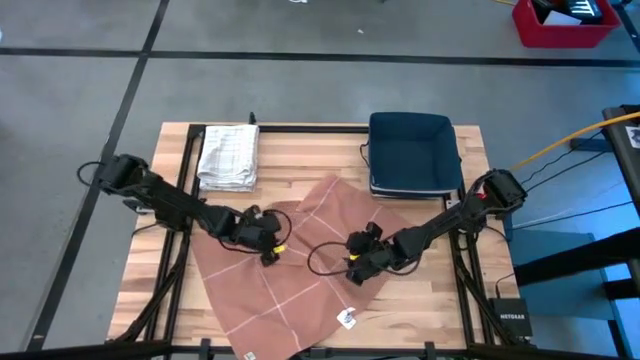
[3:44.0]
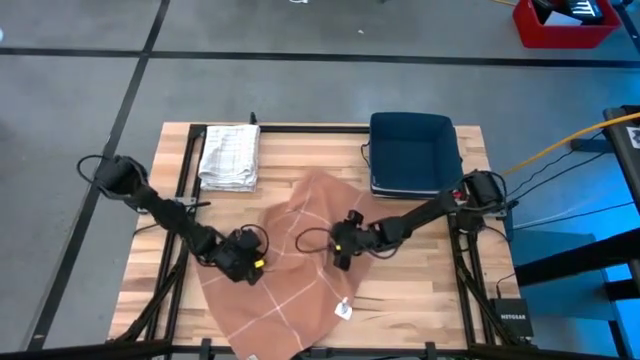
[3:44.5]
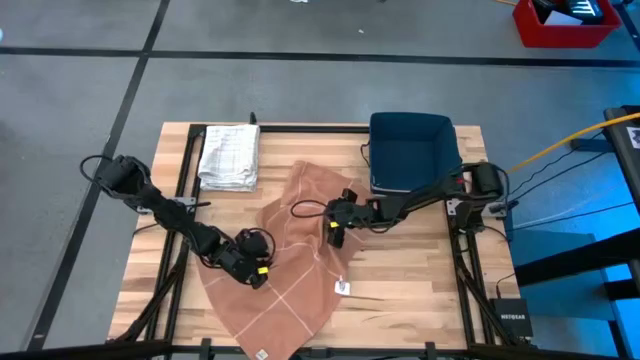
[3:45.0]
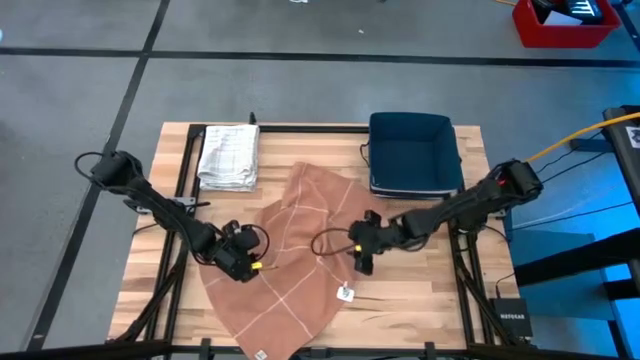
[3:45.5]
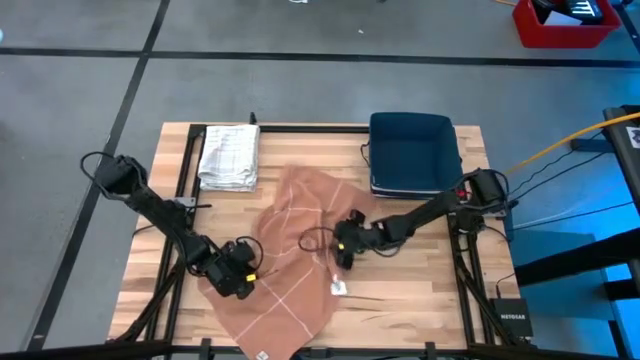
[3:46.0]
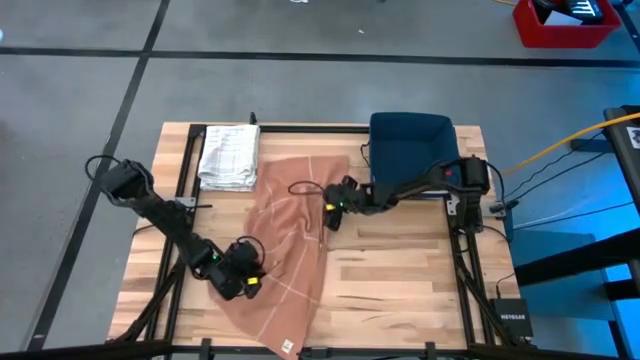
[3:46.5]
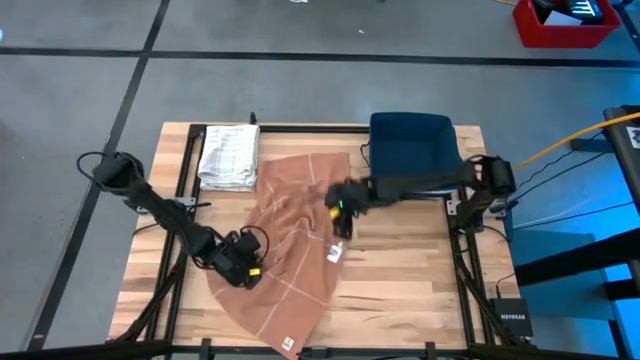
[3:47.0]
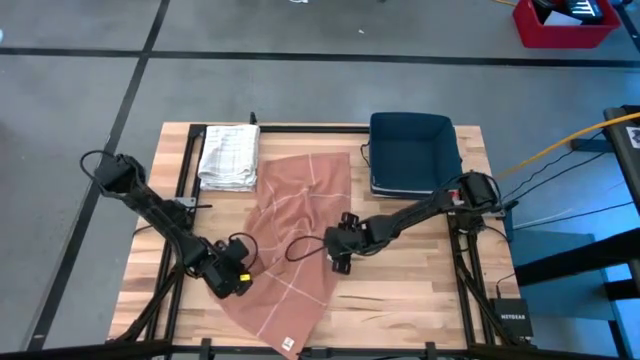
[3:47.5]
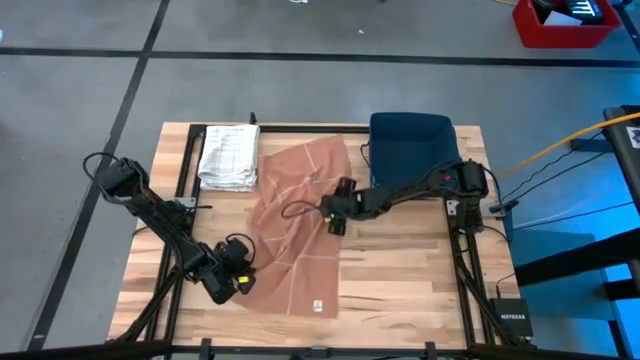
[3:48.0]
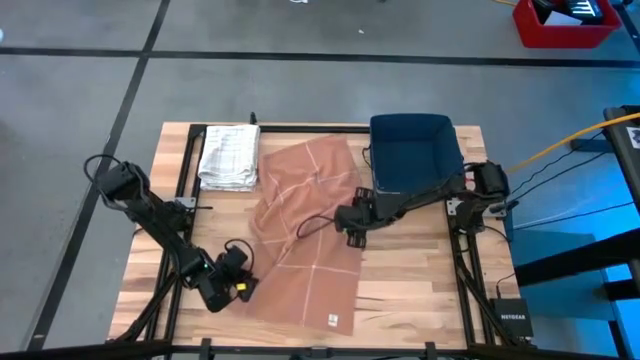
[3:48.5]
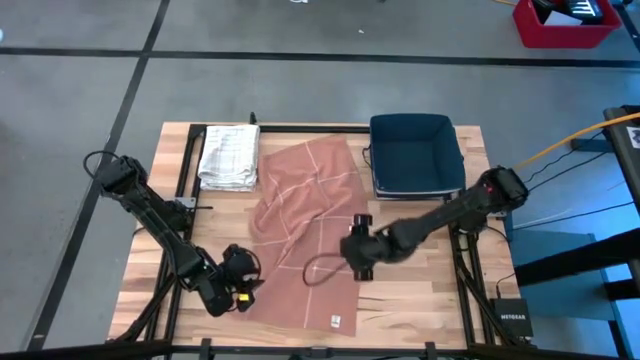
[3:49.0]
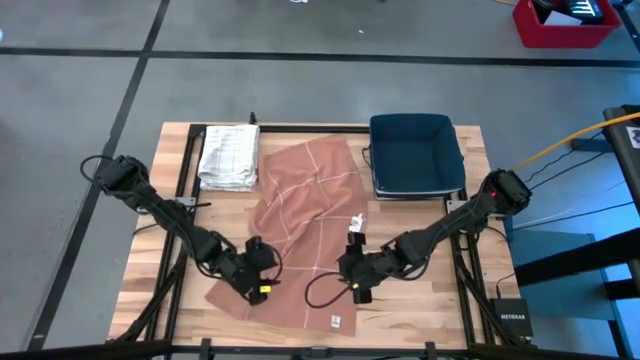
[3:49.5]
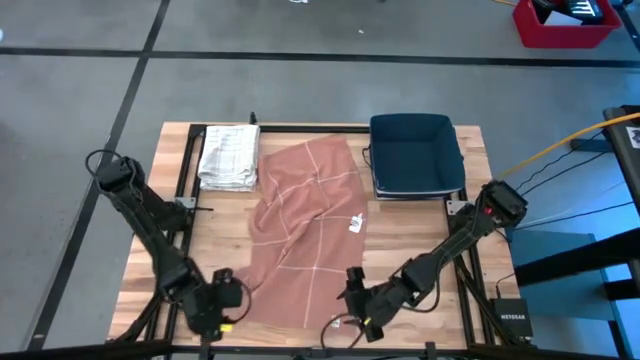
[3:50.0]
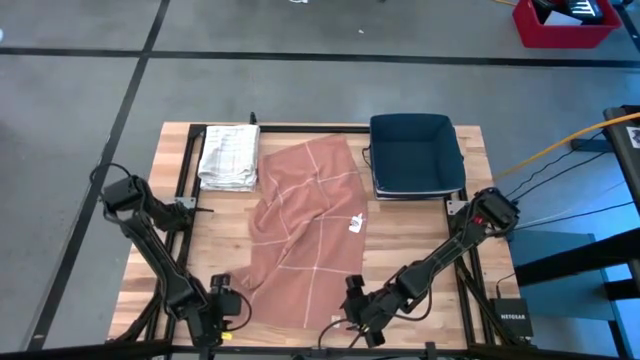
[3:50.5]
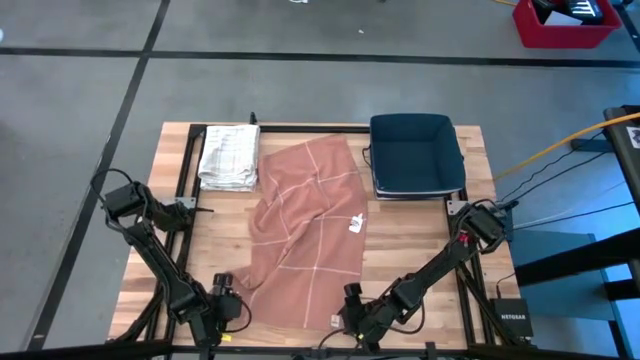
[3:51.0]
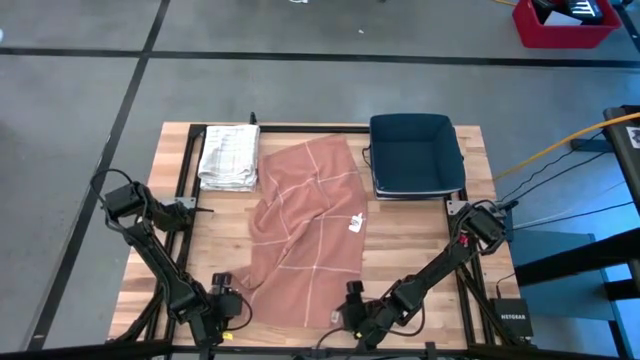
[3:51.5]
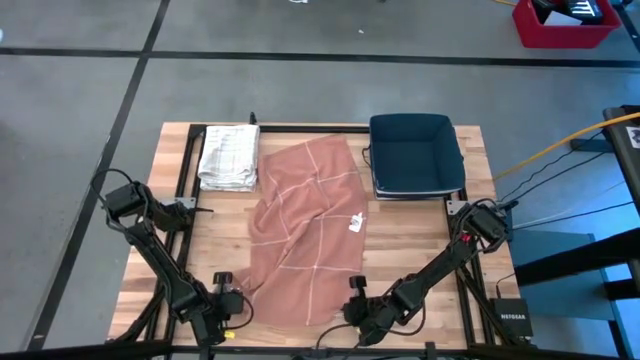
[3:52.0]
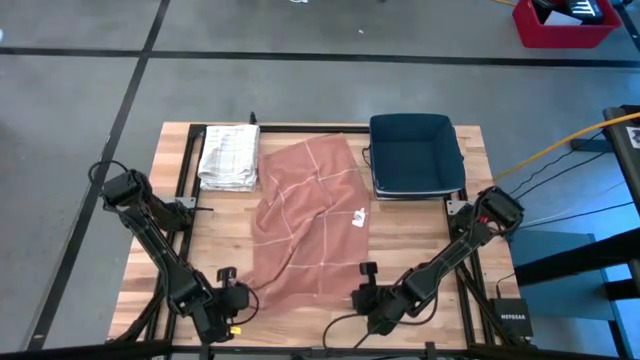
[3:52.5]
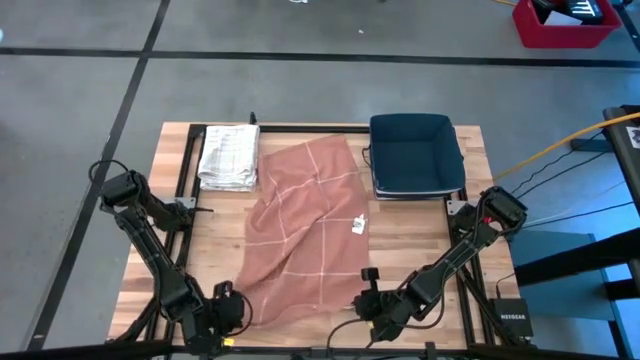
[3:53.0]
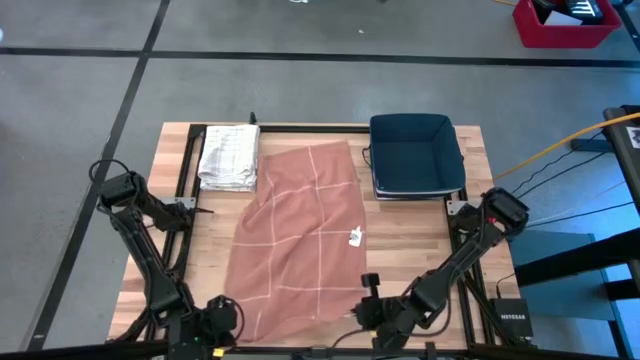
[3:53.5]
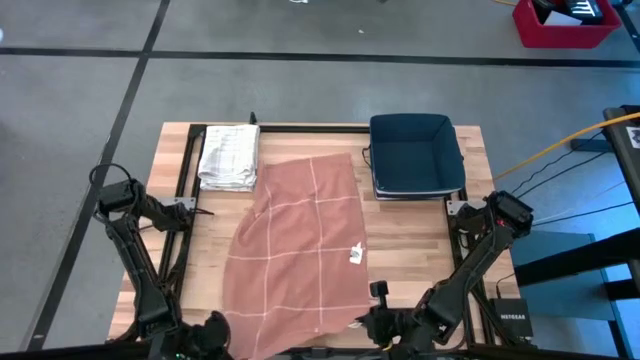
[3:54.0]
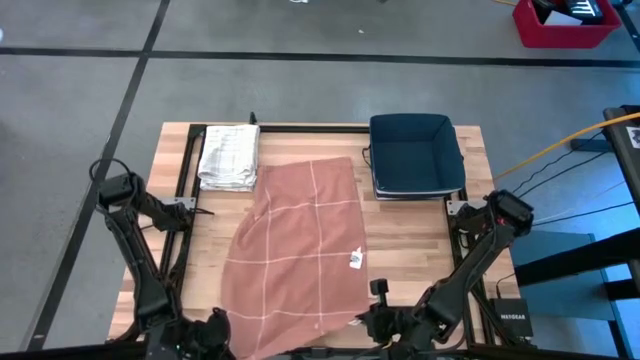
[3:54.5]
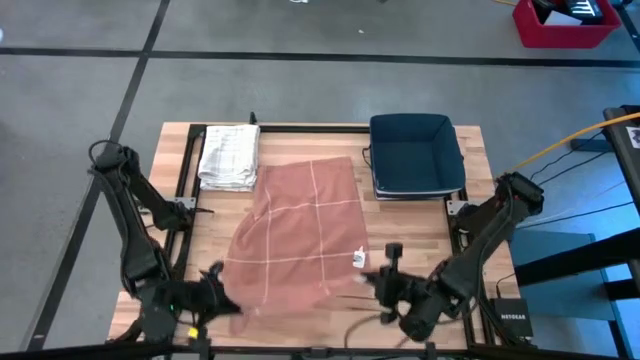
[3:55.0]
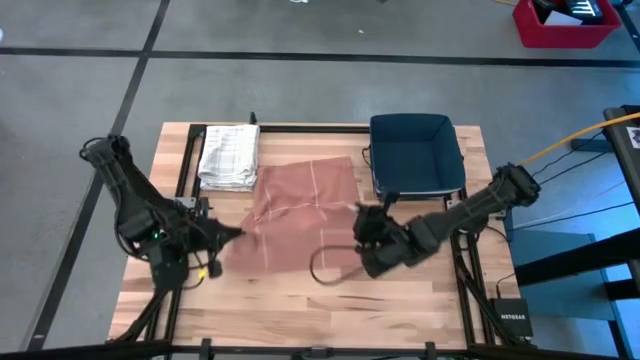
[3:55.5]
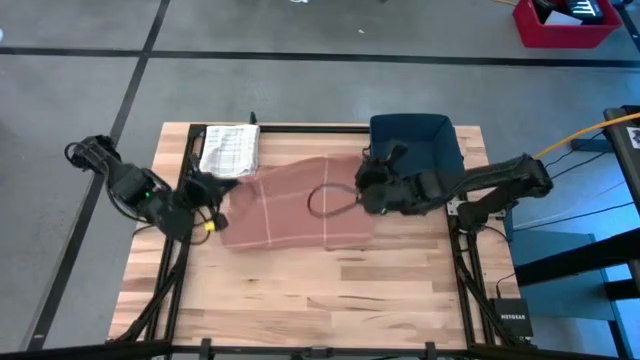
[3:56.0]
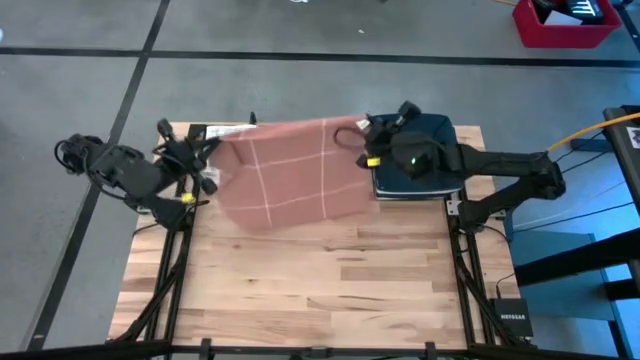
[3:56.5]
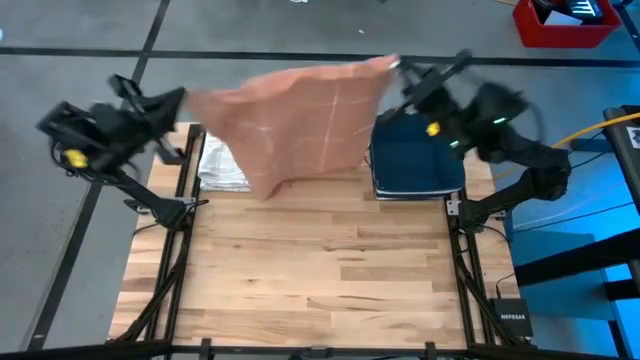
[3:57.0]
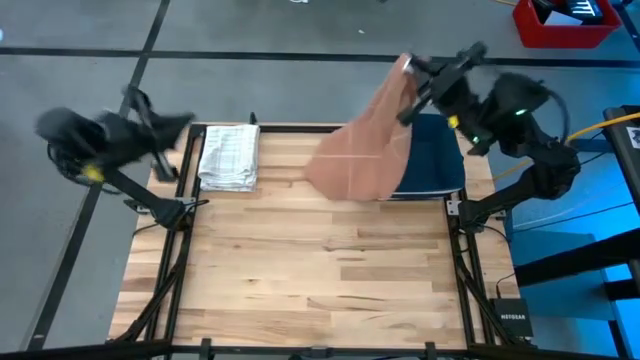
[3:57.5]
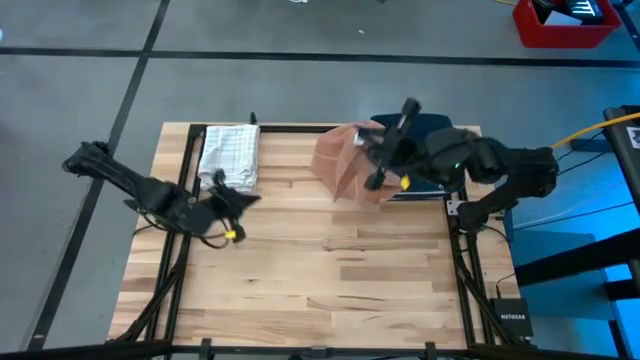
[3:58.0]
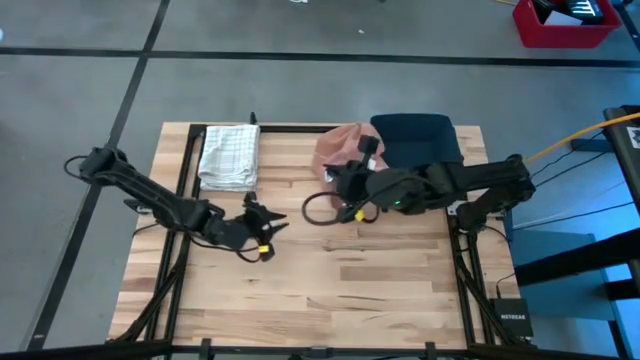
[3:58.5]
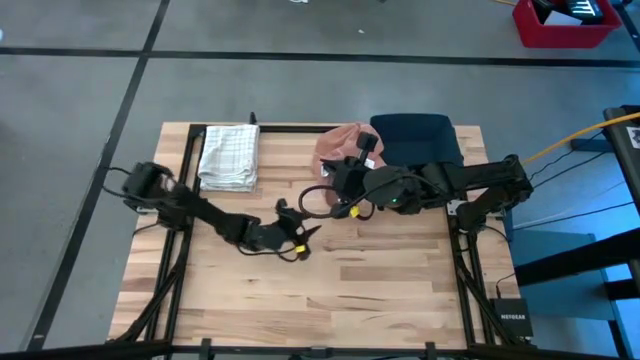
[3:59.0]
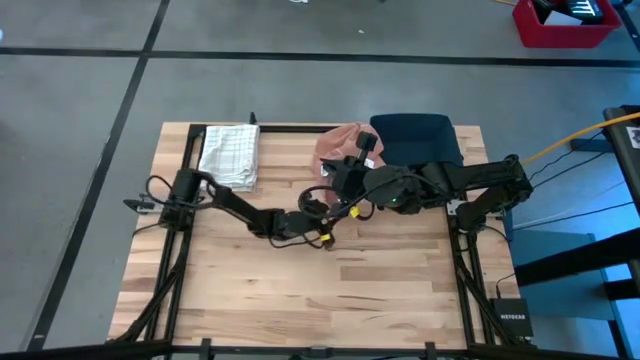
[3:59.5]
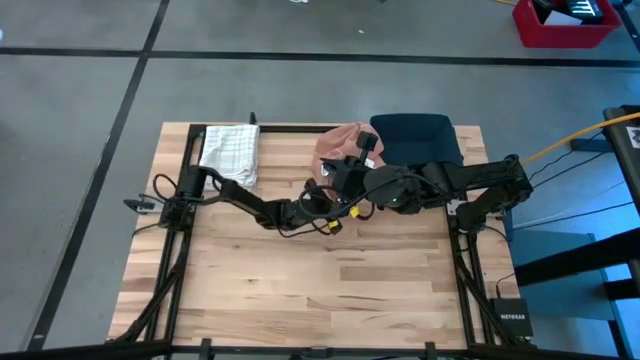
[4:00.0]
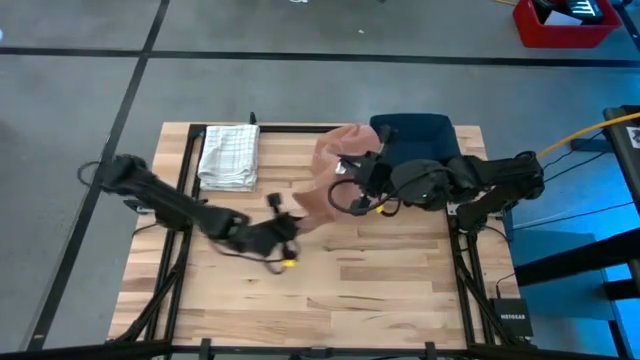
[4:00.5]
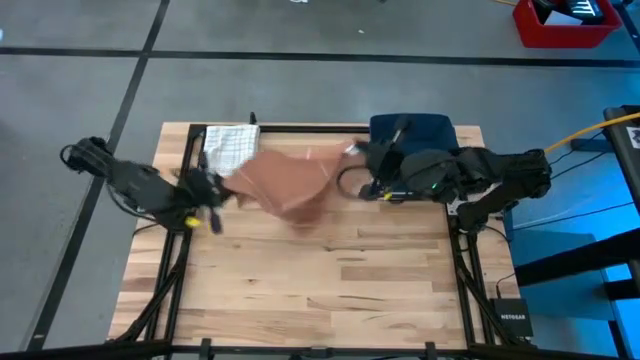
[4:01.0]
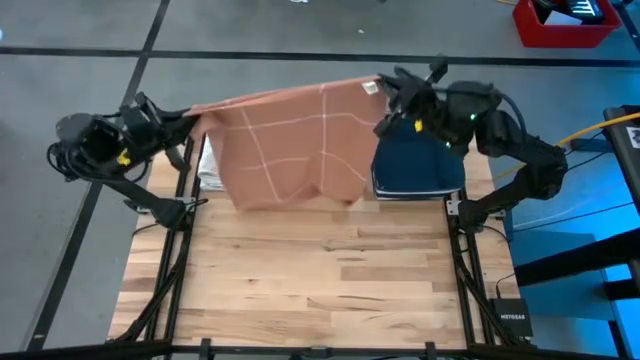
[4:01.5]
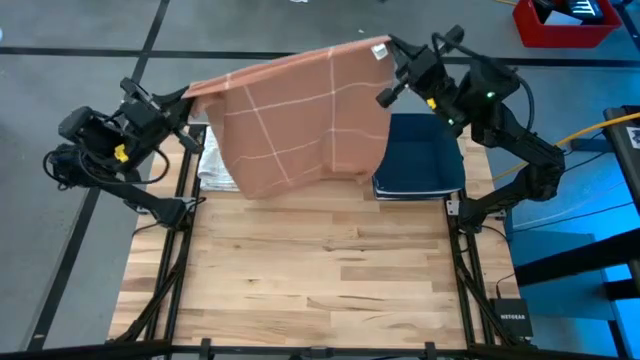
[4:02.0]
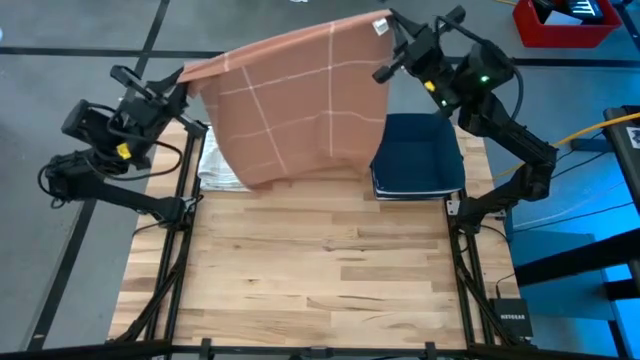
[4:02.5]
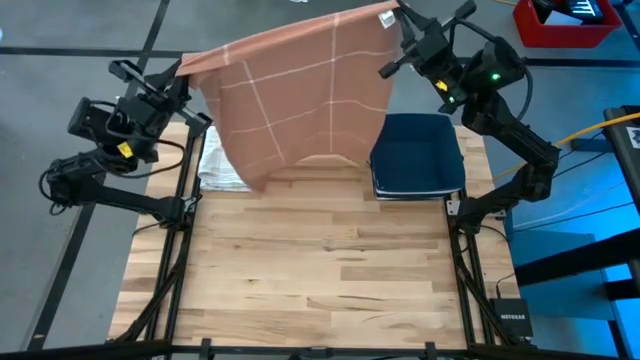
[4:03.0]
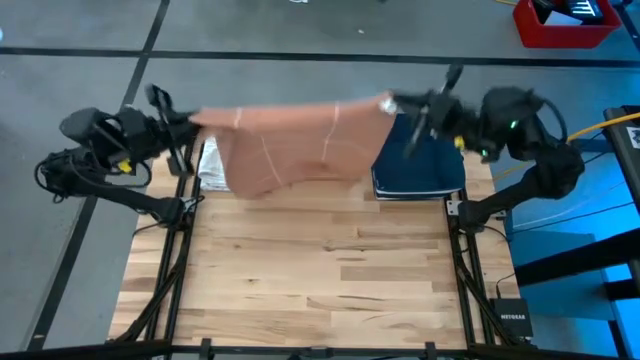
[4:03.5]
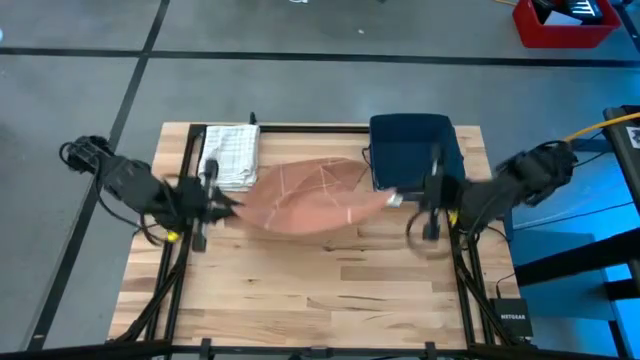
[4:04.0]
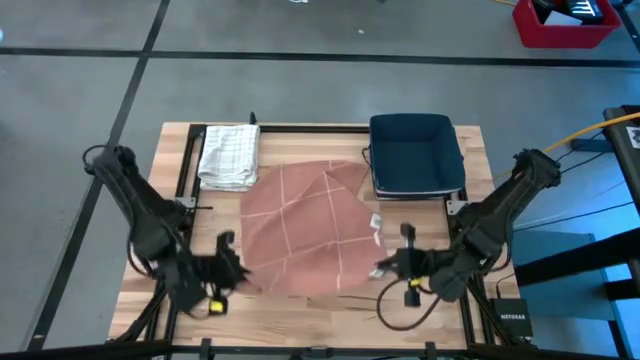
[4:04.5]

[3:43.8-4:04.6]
Task: Fold towel
Fold the brown towel on the table
